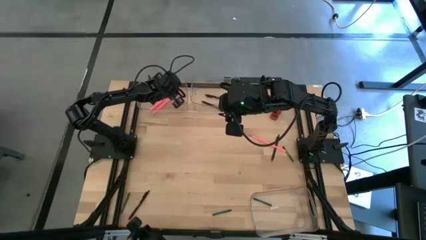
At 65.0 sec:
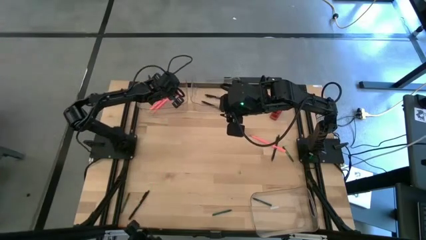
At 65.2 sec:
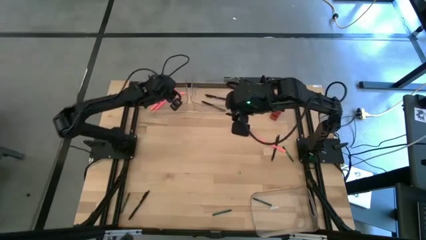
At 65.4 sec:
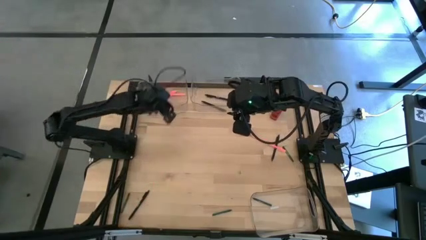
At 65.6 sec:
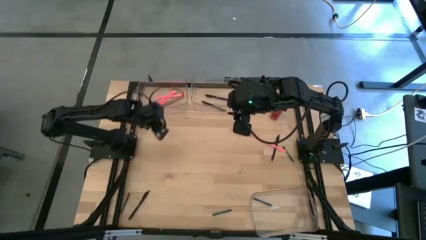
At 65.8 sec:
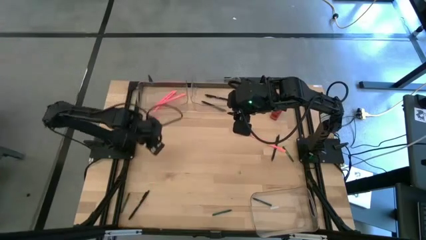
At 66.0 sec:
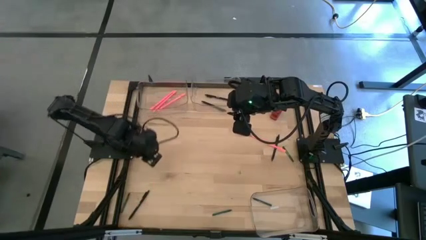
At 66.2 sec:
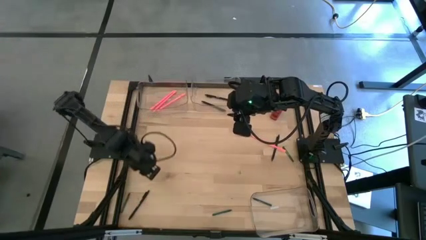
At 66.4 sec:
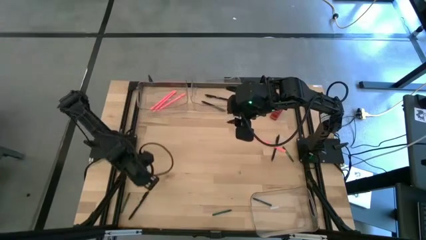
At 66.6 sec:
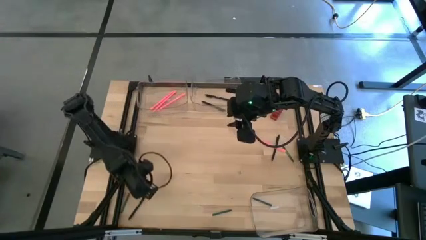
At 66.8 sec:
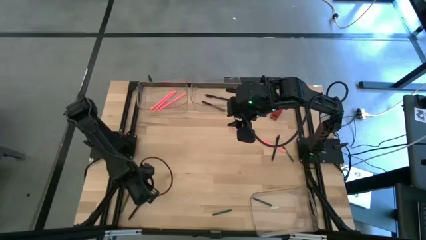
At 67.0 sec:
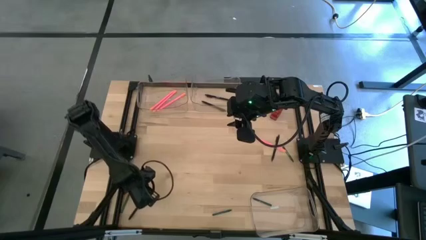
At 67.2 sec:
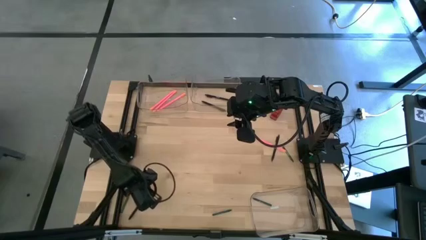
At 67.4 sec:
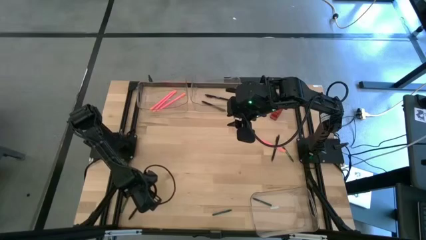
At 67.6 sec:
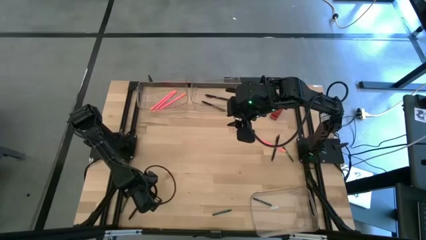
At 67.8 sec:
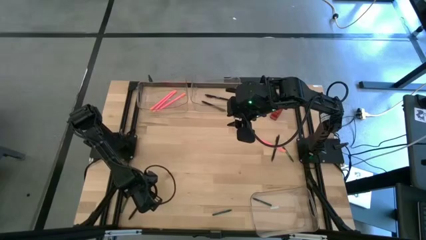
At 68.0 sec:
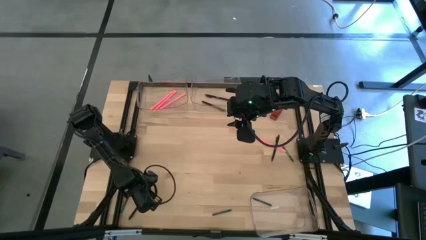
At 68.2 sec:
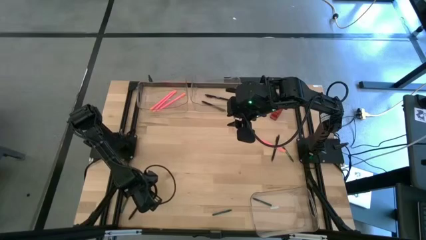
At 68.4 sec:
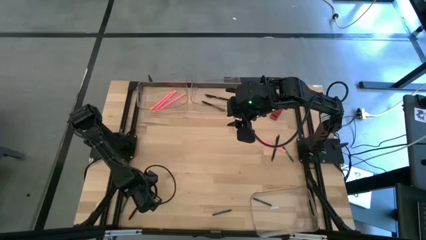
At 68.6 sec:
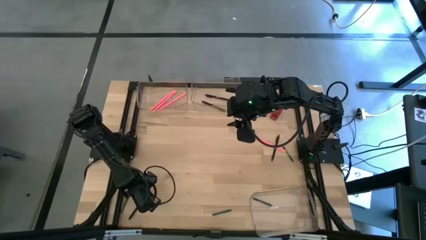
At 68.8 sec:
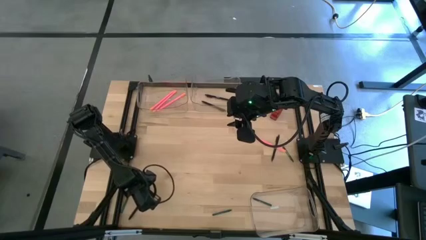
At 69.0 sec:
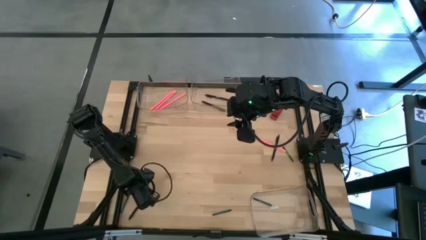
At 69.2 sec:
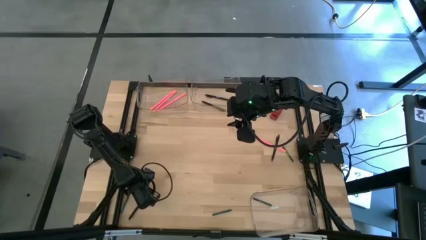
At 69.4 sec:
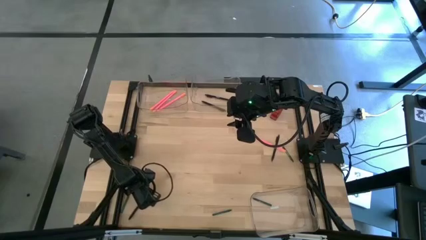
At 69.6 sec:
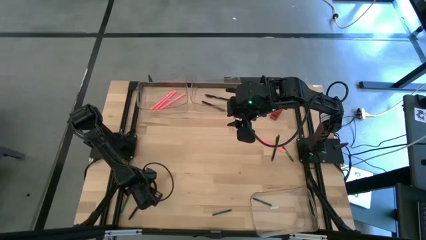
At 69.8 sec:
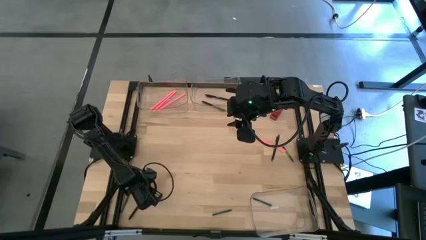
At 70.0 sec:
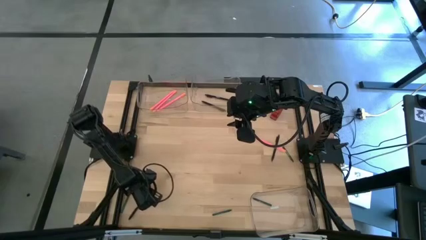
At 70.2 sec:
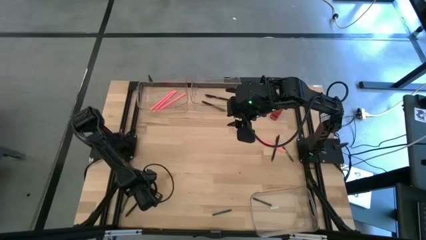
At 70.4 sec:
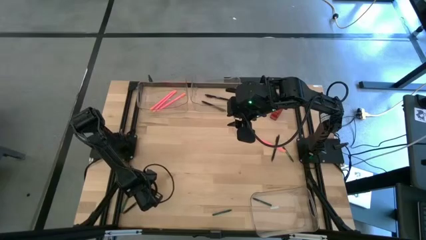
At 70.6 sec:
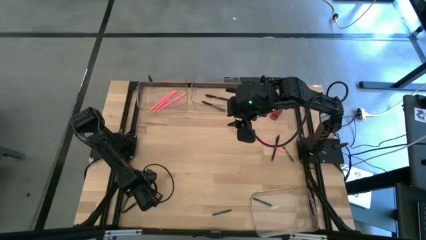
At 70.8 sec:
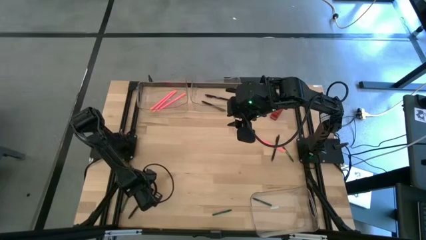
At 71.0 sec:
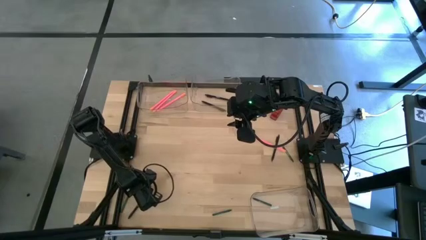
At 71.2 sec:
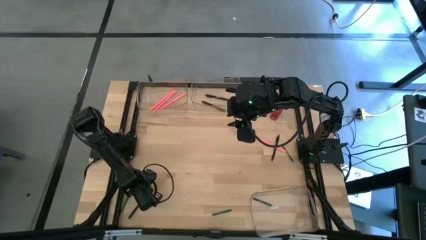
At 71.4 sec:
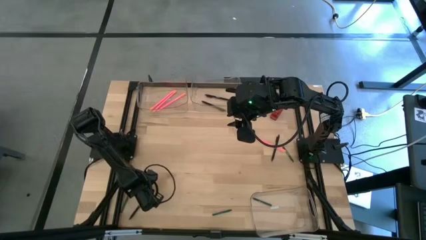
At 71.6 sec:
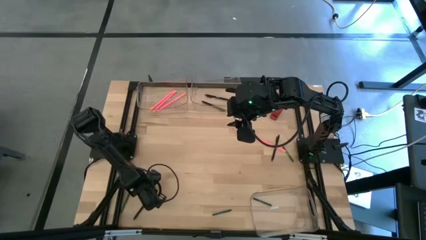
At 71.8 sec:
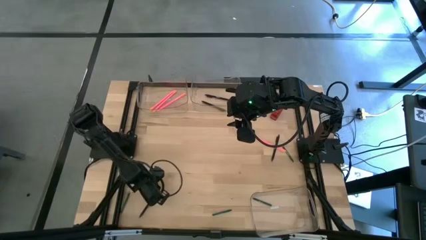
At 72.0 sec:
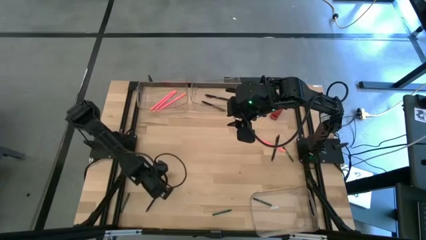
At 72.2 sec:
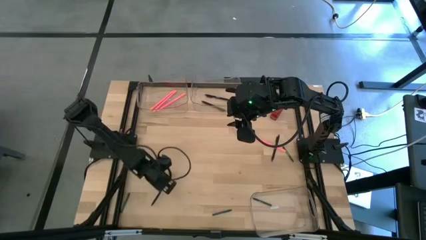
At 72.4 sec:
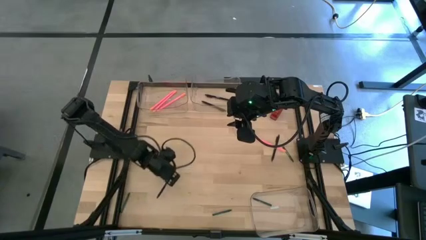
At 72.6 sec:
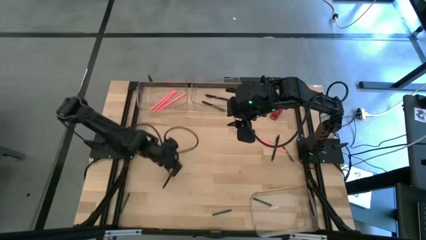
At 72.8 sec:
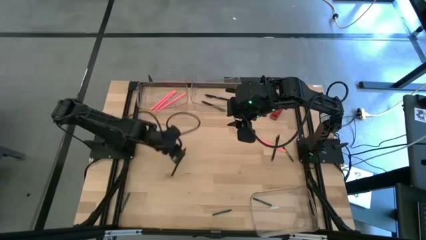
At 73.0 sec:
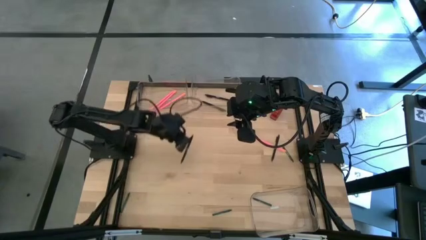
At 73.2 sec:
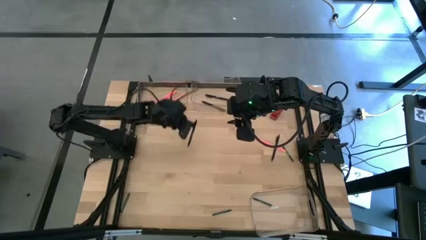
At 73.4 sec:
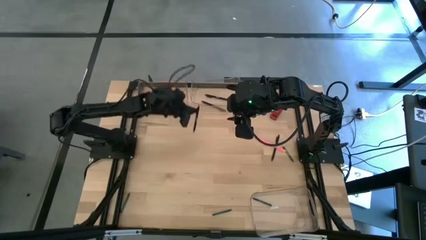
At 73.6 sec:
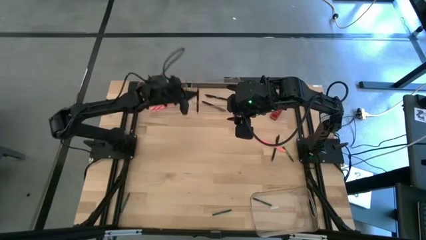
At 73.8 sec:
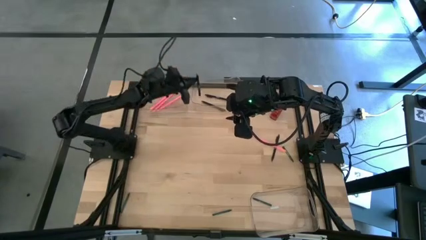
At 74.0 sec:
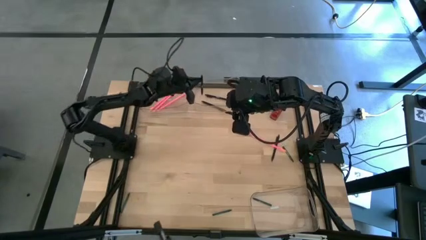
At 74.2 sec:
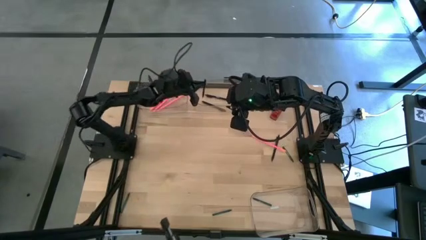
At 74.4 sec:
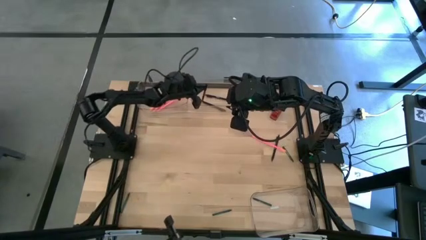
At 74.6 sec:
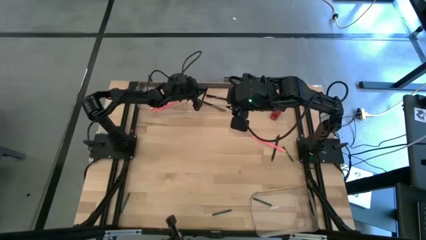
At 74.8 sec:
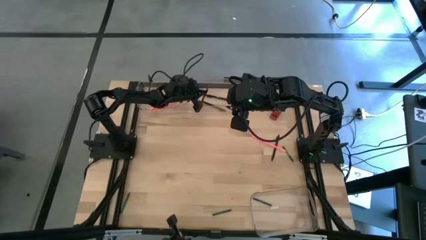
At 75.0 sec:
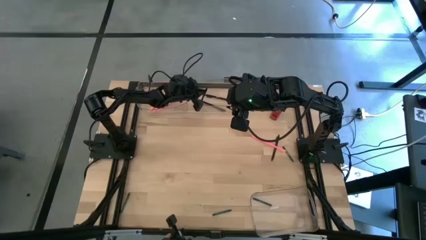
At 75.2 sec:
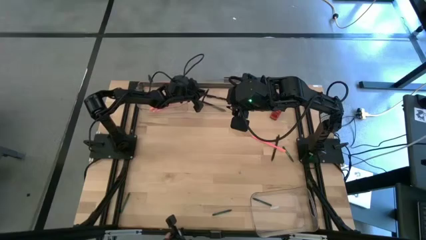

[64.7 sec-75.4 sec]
Task: Sort crayons/erasers/pens/pencils in bins
Put the black pen into the top right transparent bin

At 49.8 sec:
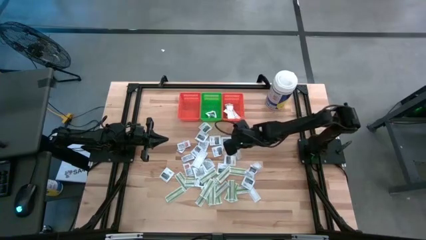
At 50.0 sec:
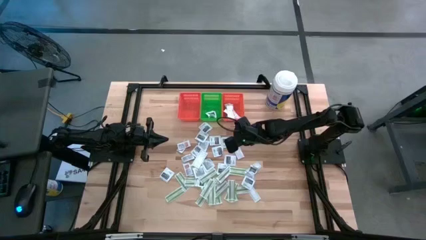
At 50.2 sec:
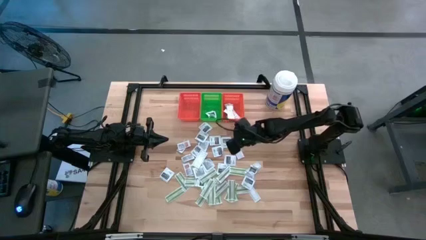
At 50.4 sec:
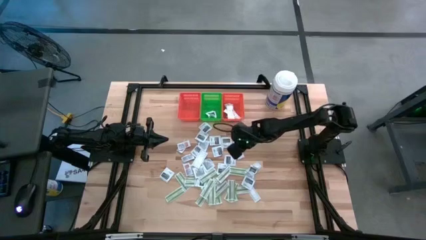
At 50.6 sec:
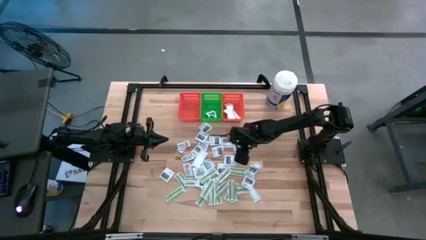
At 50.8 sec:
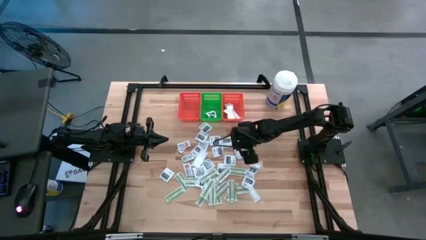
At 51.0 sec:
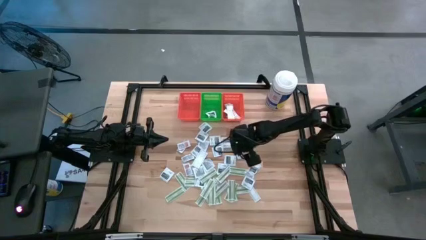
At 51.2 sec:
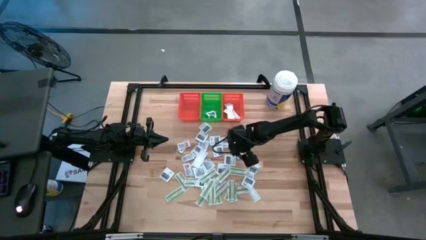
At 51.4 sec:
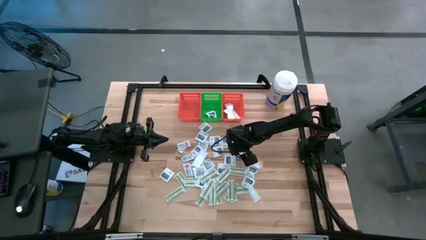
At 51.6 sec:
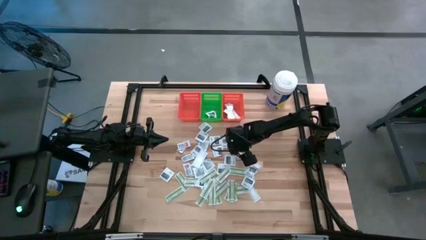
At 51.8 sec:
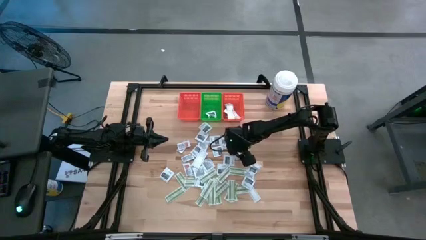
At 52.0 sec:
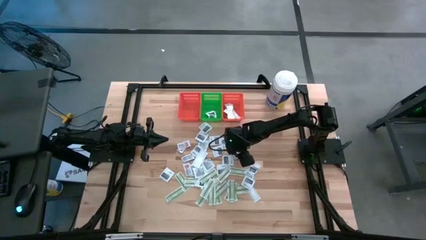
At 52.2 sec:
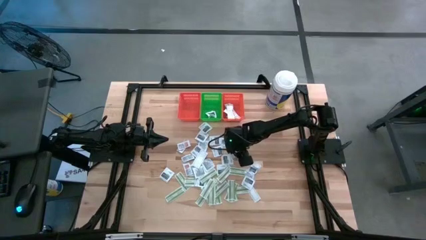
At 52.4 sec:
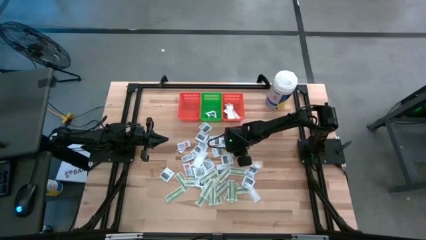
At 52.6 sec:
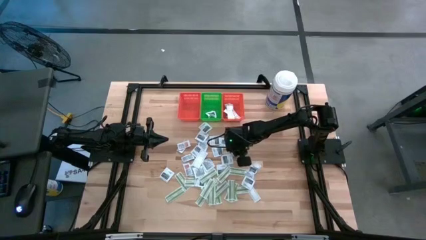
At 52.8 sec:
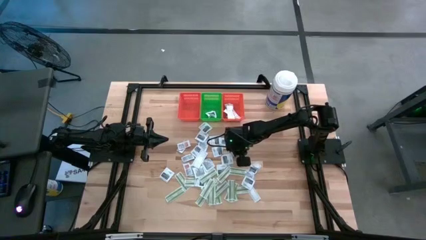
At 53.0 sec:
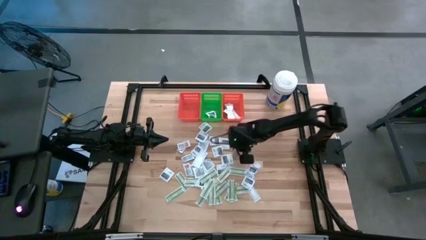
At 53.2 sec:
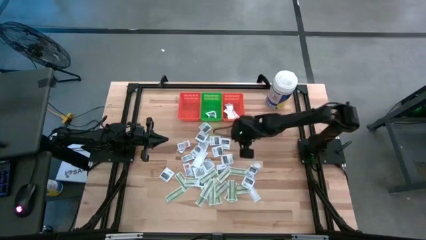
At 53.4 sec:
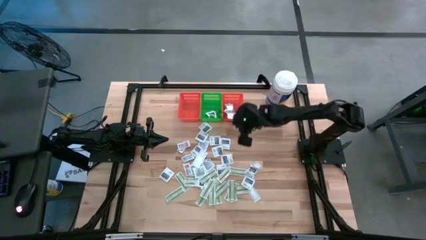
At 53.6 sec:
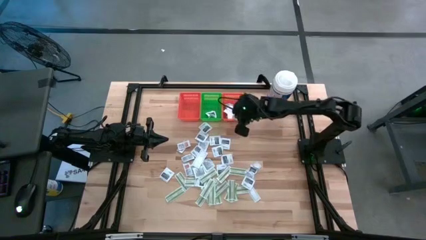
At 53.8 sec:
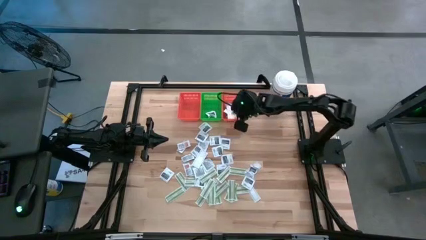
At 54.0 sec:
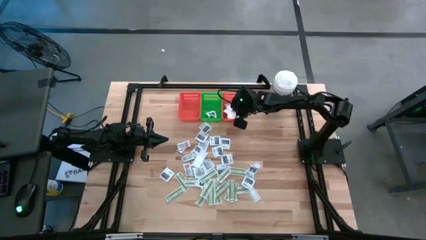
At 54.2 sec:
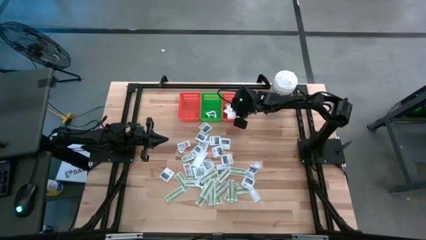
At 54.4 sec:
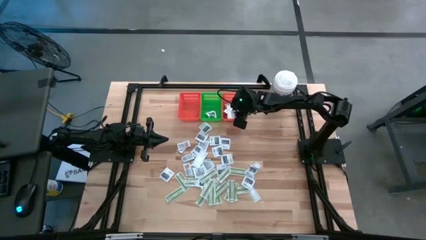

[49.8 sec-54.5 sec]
Task: Pick & Place First Aid Supplies
Put the bandage pack into the right orange bin
